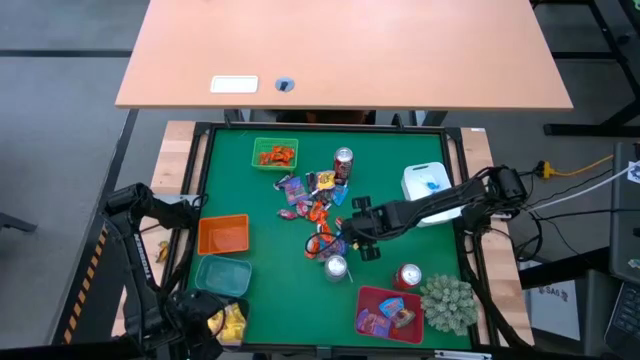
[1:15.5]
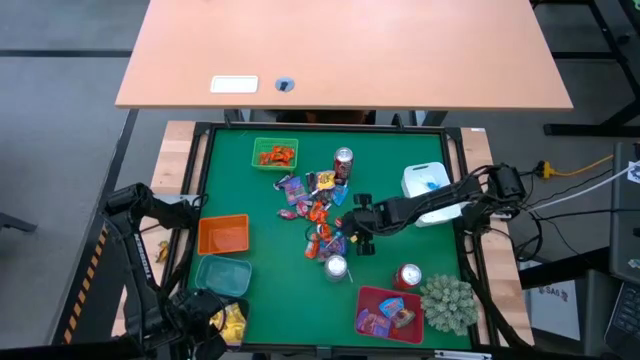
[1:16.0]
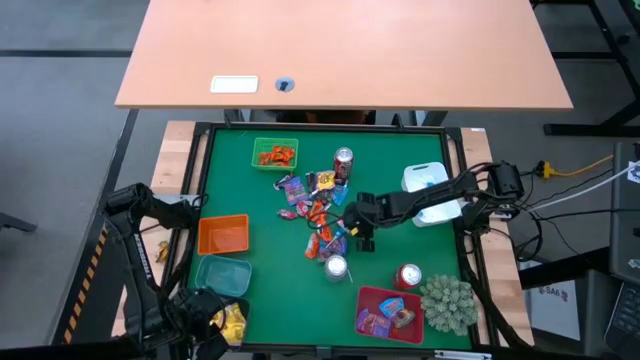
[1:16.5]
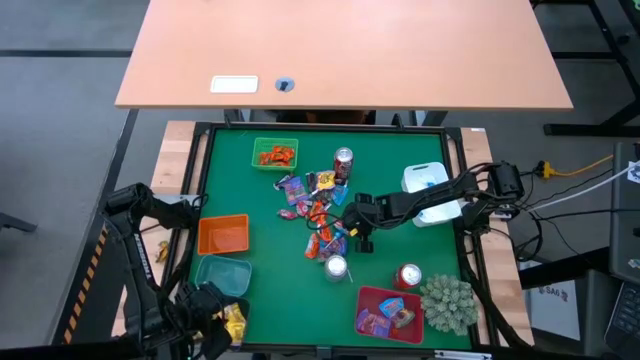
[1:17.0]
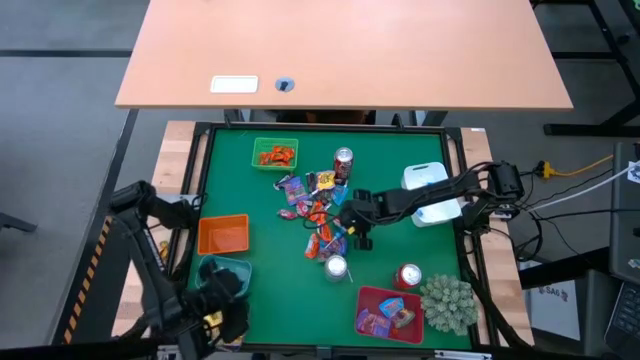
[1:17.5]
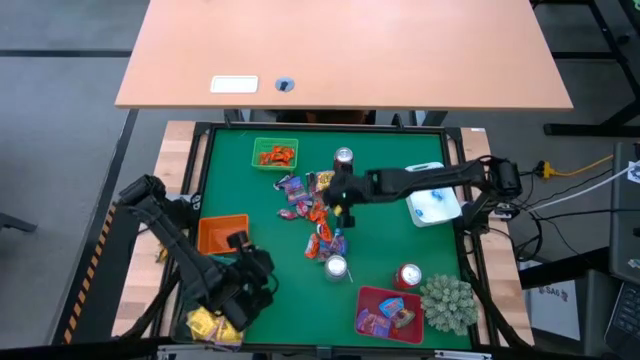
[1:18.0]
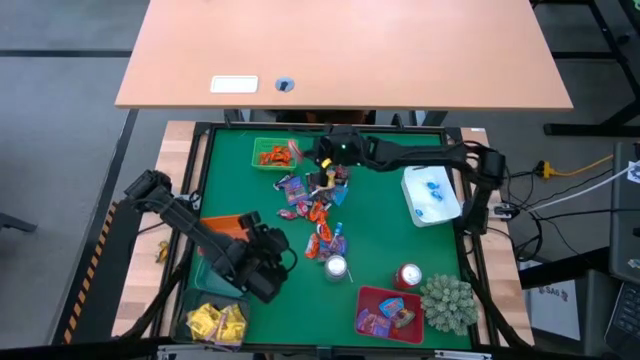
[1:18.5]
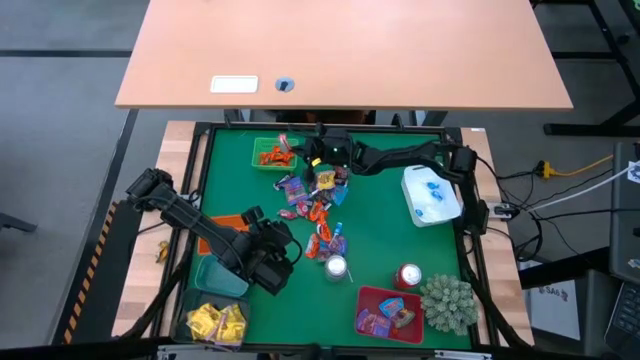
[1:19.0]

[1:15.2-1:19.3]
Task: Sort candy
Put the orange chocolate into the green bin

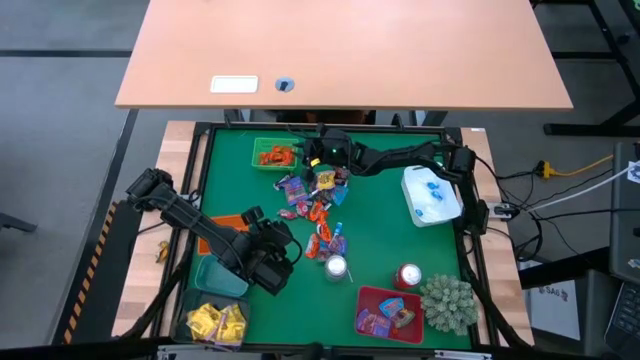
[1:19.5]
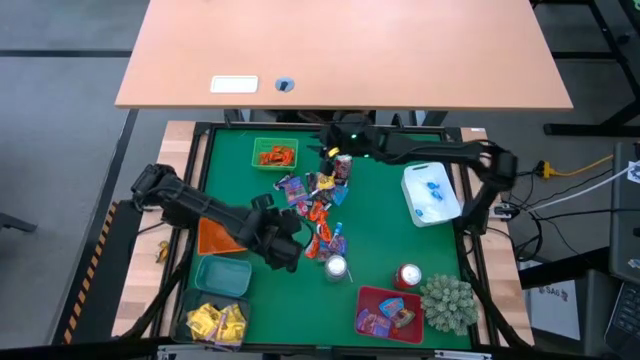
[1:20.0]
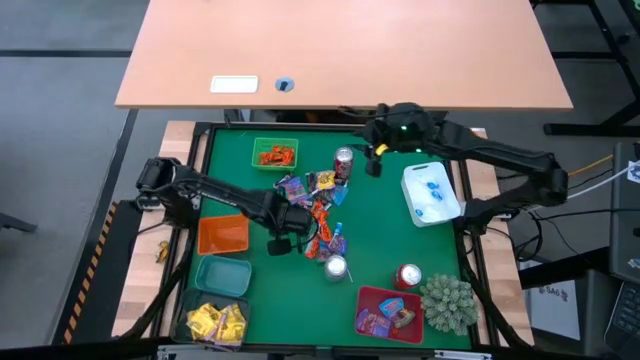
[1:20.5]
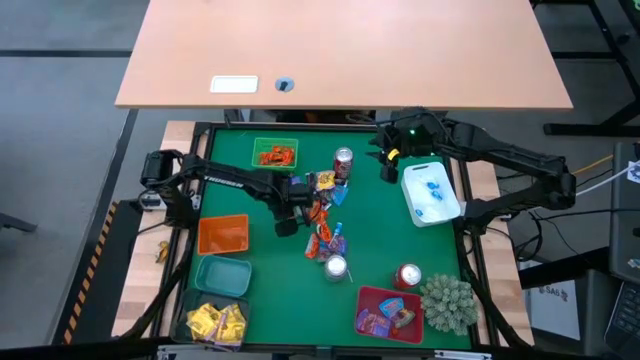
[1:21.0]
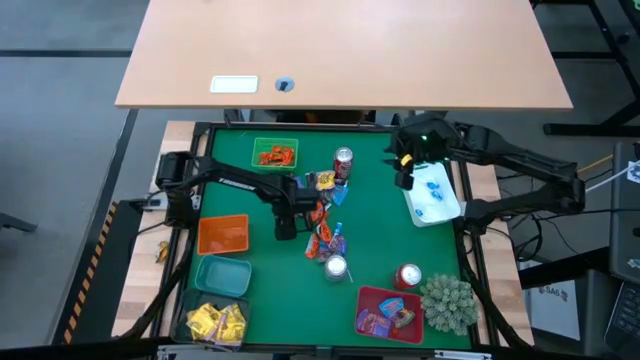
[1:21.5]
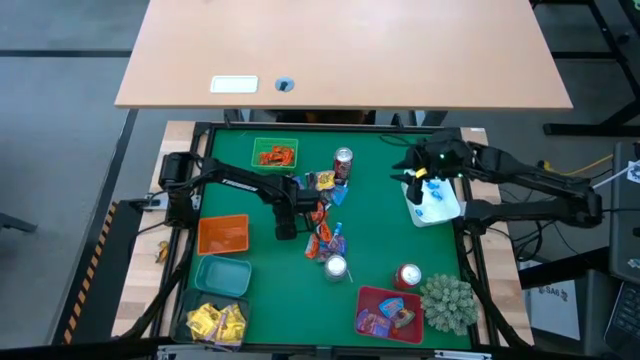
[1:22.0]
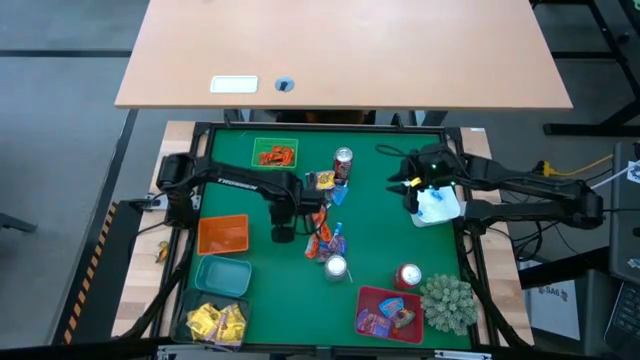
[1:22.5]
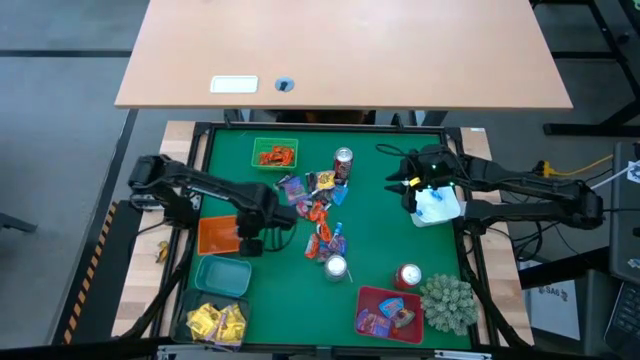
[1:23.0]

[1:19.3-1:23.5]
Put the pink candy into the orange bin

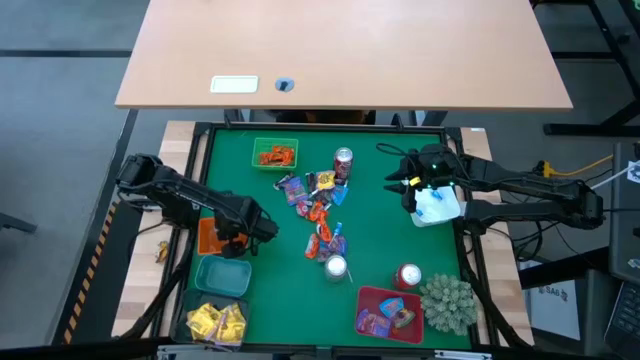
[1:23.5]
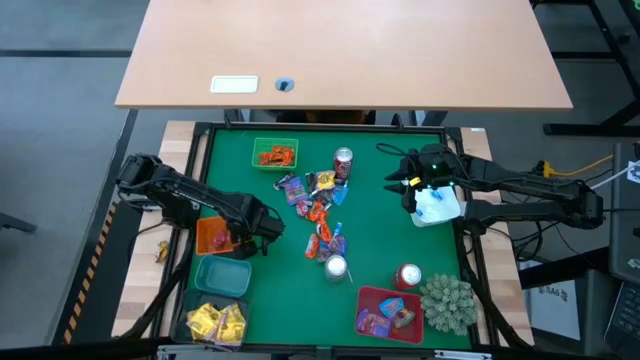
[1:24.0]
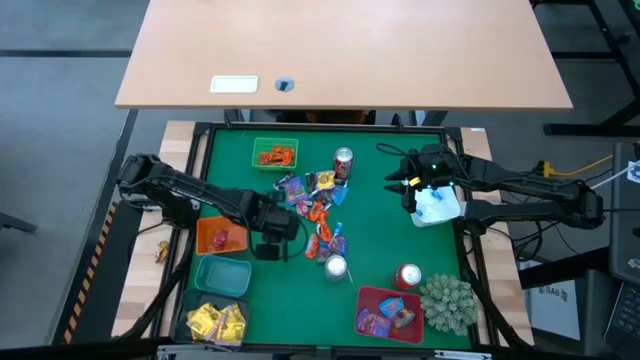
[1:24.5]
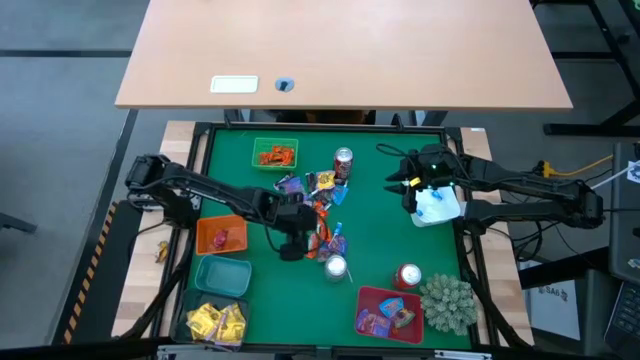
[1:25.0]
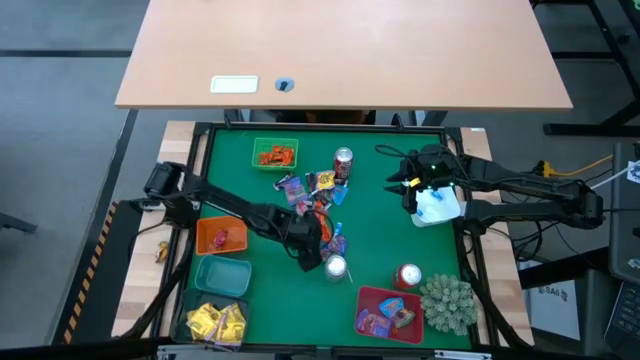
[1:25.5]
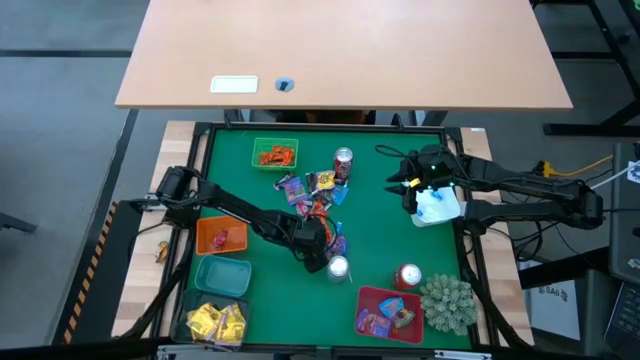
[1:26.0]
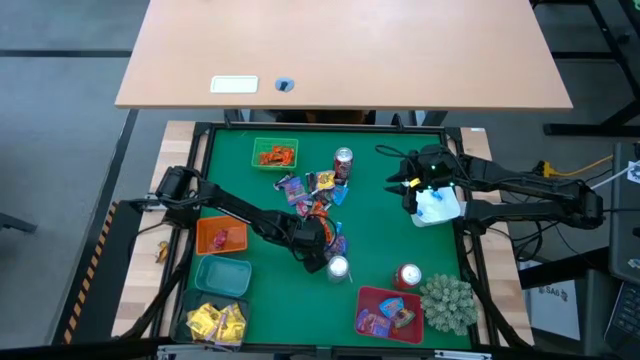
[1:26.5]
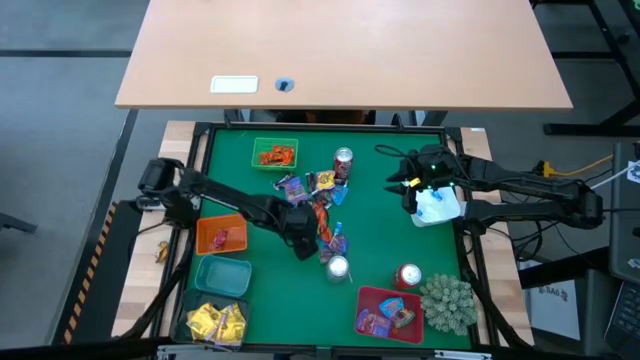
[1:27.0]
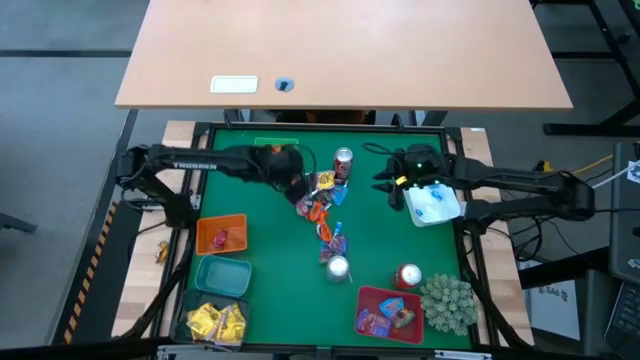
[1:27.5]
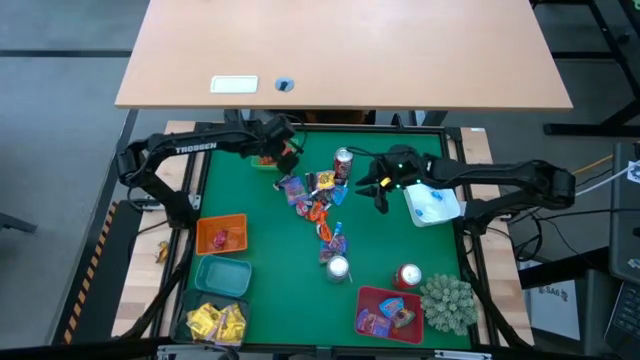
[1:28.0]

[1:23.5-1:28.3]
Put the orange chocolate into the green bin

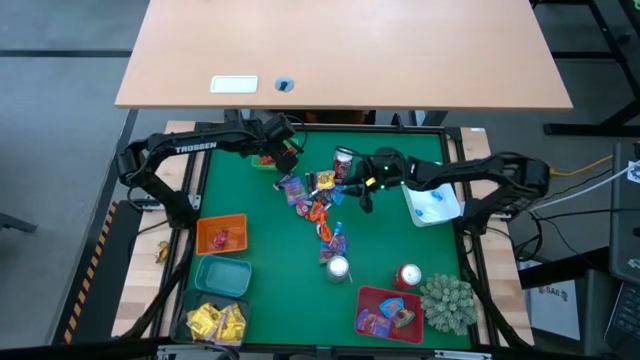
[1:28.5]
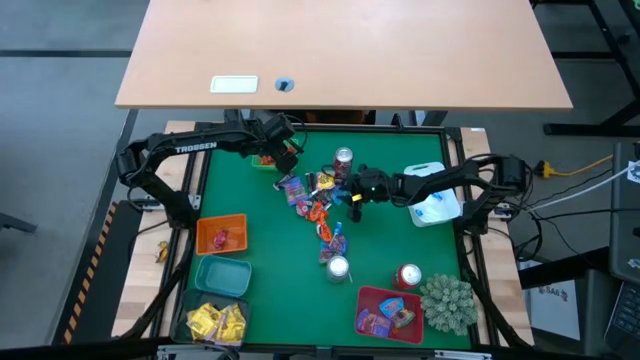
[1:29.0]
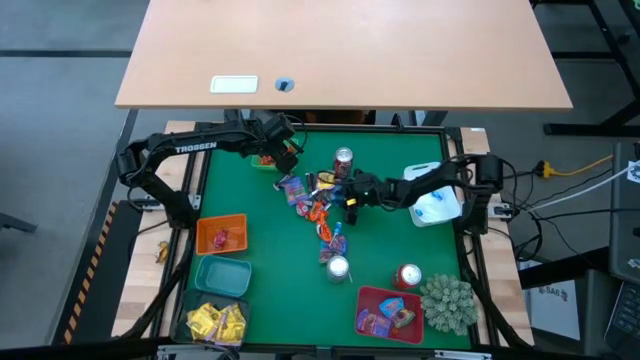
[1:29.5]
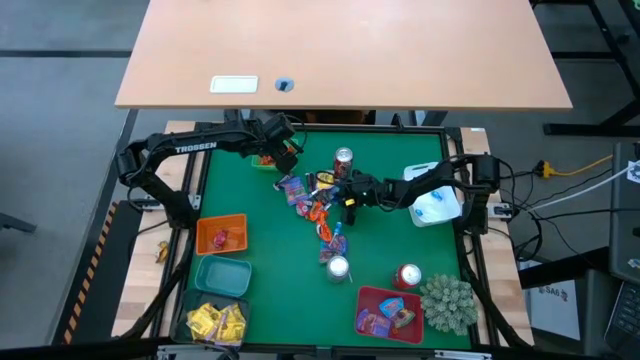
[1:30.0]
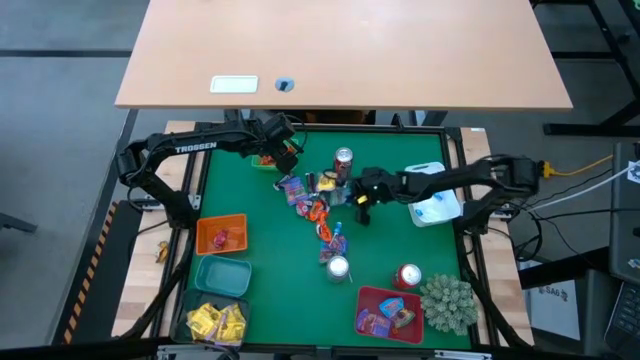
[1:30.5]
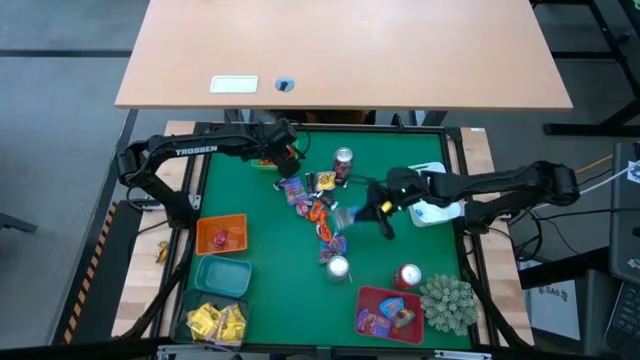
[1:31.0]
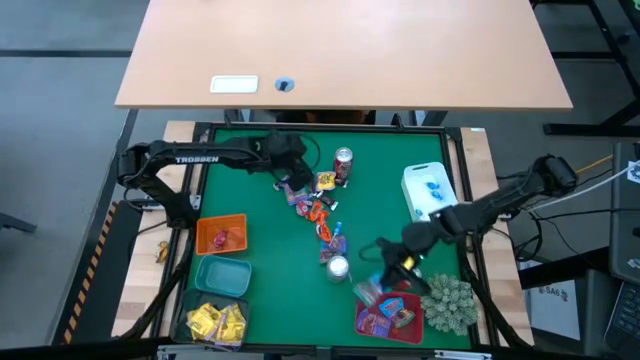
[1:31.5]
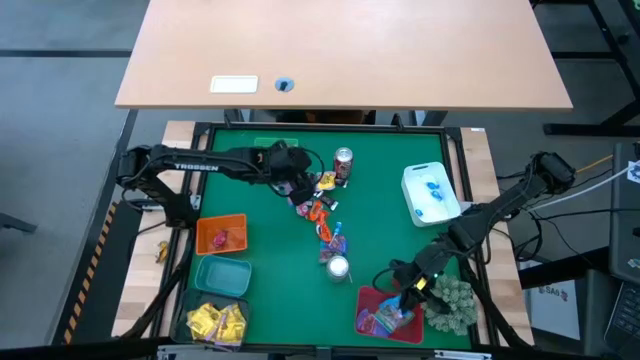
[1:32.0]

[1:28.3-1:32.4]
Put the blue candy into the red bin

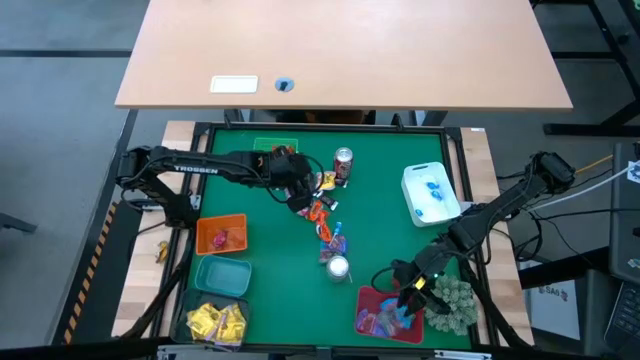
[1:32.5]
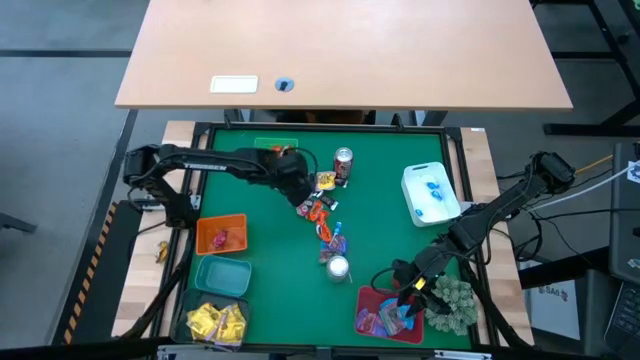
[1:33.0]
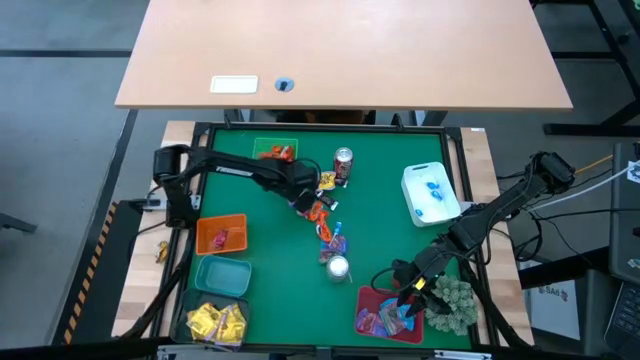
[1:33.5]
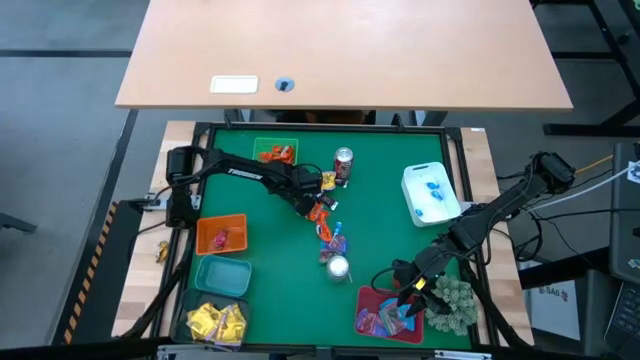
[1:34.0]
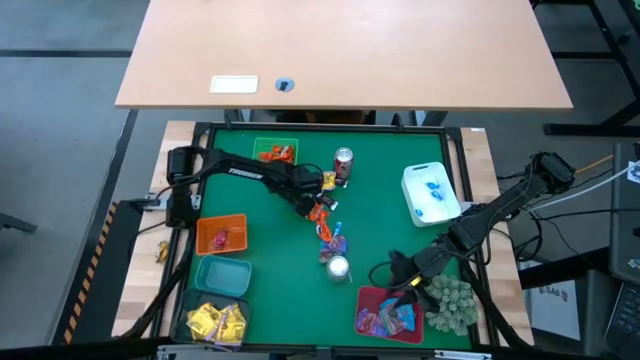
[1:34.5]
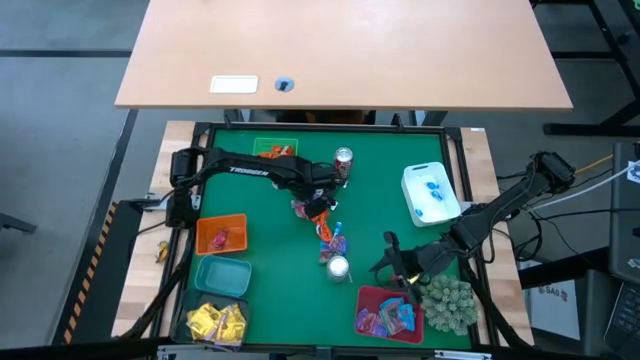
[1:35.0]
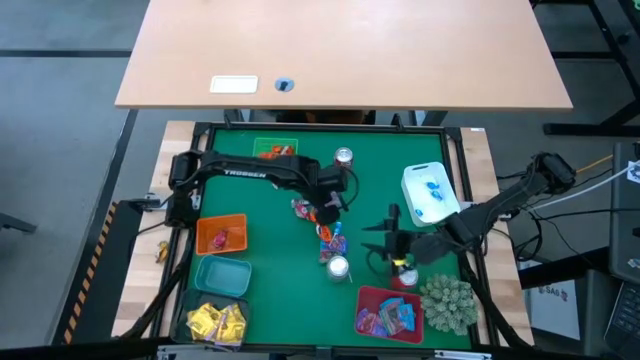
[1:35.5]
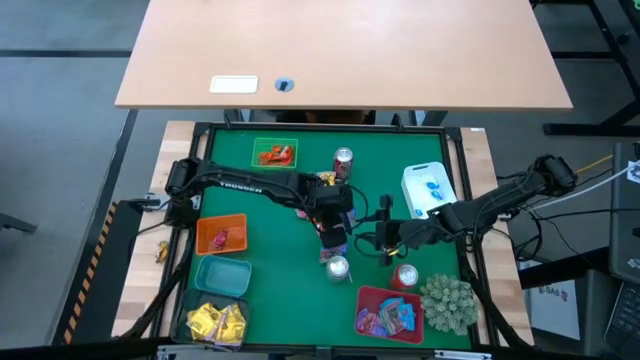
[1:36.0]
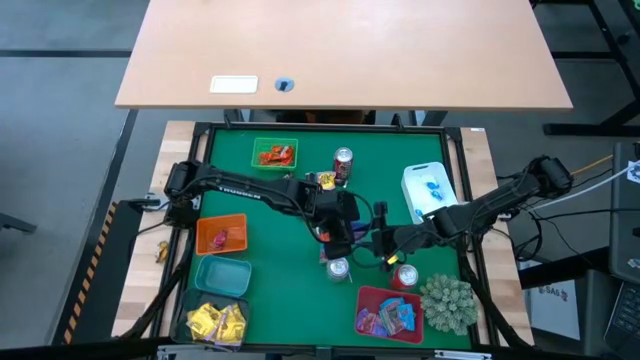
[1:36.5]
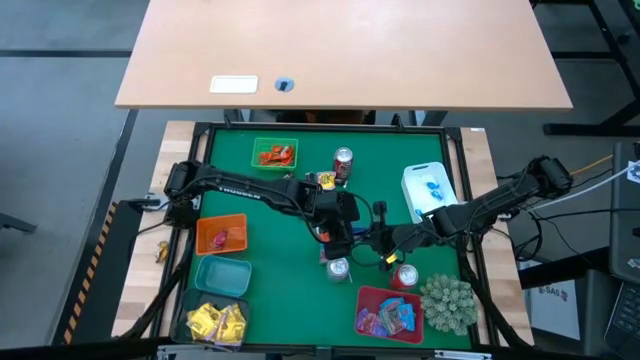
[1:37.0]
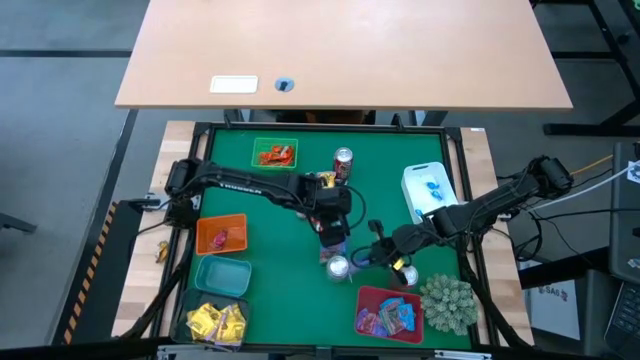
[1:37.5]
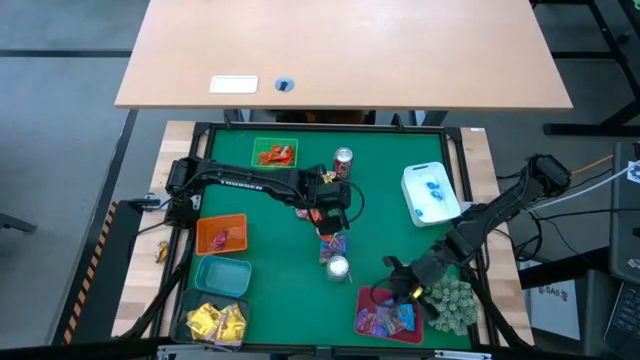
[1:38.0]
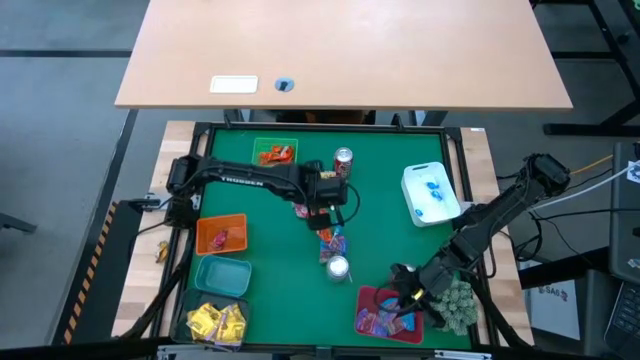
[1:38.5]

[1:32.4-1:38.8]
Put the purple candy into the red bin
